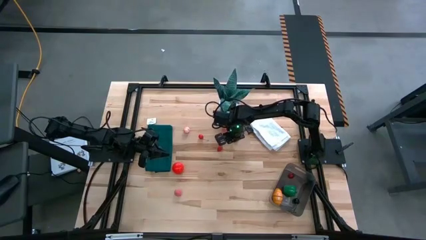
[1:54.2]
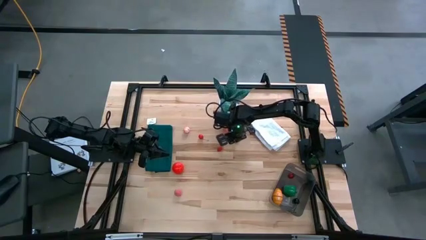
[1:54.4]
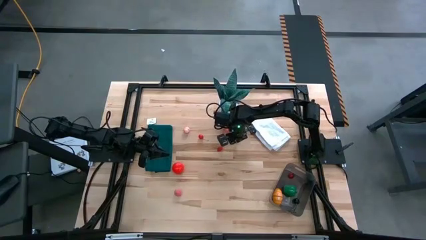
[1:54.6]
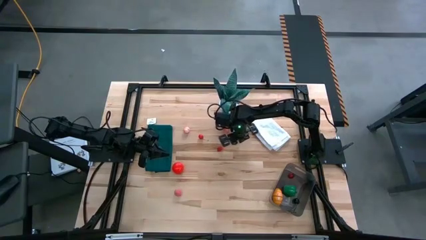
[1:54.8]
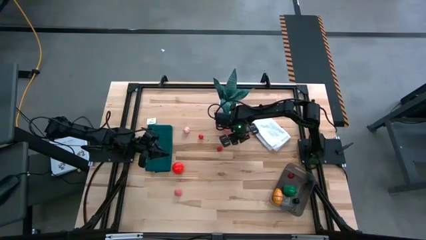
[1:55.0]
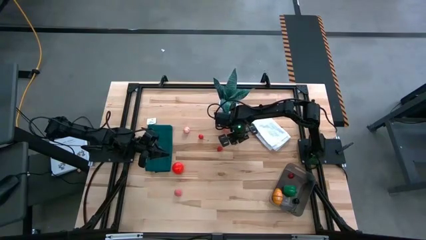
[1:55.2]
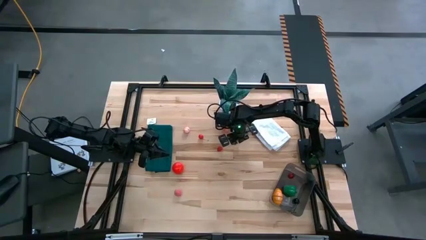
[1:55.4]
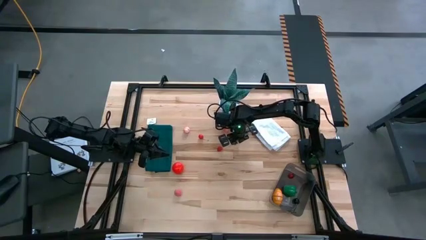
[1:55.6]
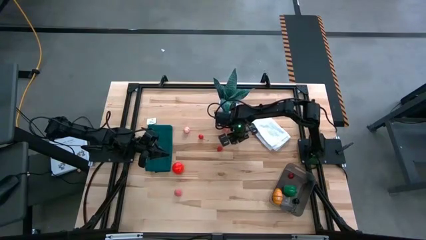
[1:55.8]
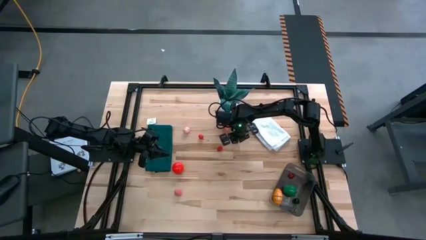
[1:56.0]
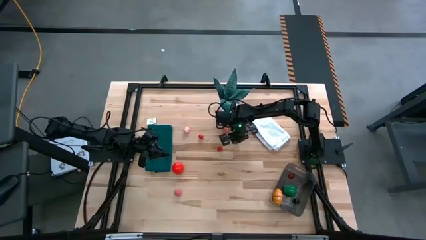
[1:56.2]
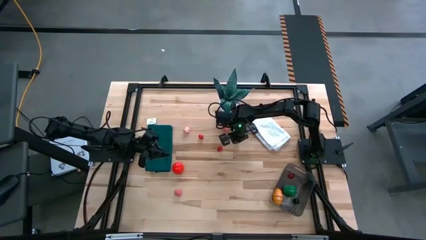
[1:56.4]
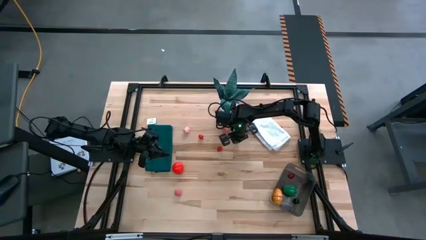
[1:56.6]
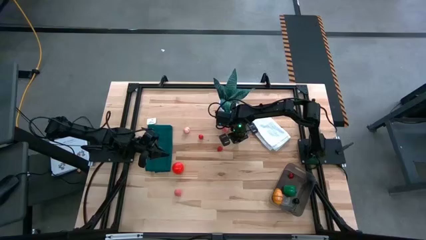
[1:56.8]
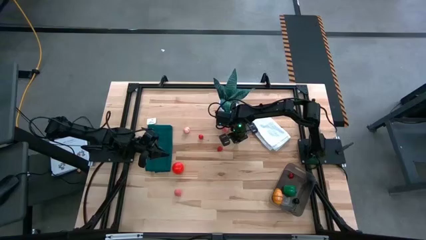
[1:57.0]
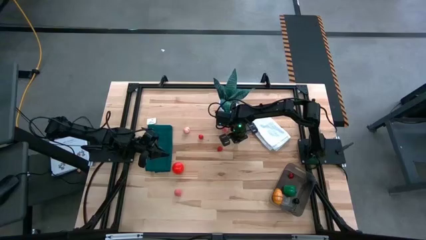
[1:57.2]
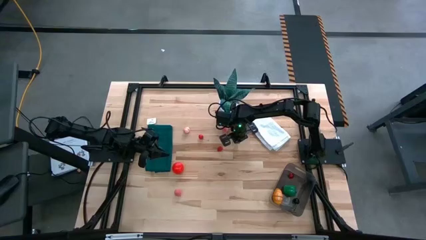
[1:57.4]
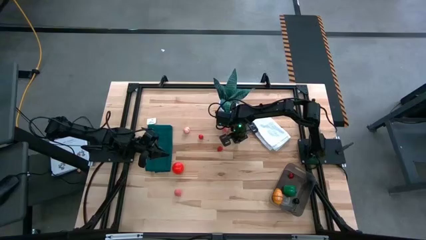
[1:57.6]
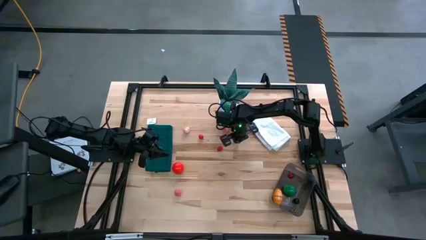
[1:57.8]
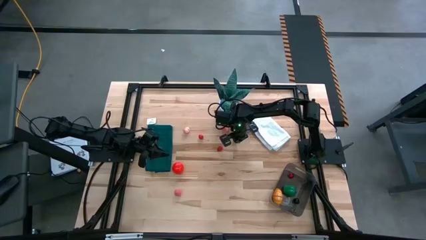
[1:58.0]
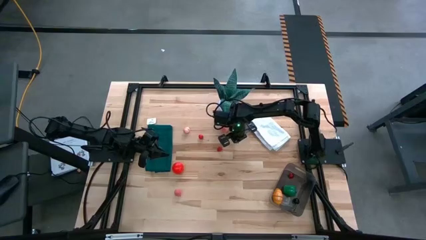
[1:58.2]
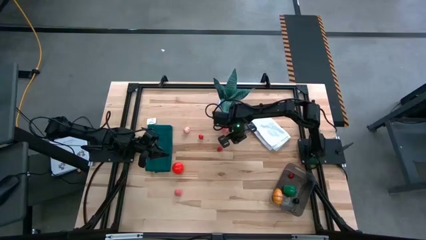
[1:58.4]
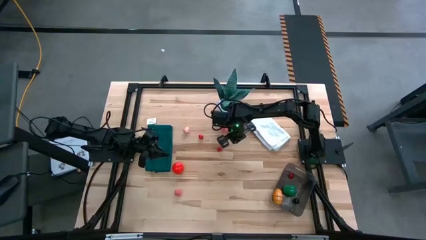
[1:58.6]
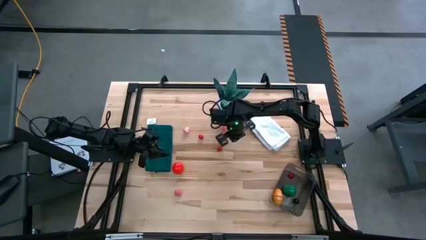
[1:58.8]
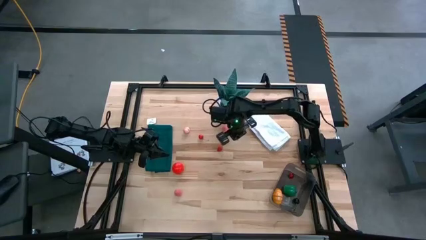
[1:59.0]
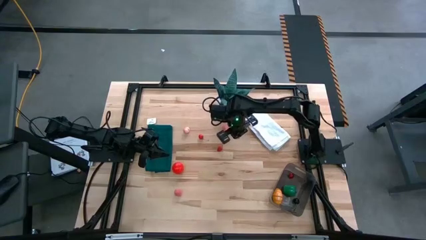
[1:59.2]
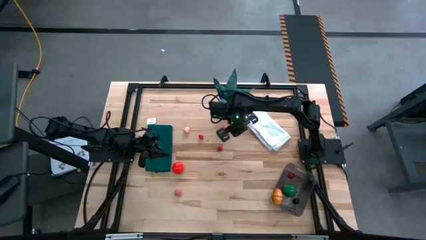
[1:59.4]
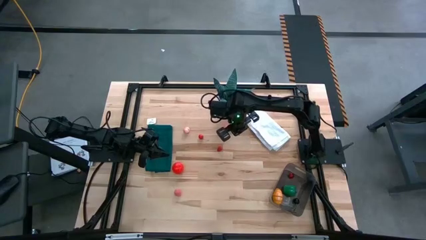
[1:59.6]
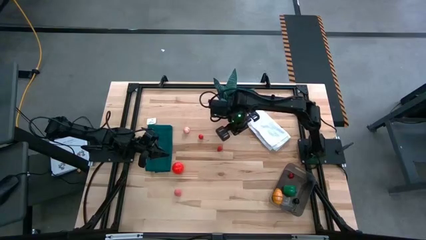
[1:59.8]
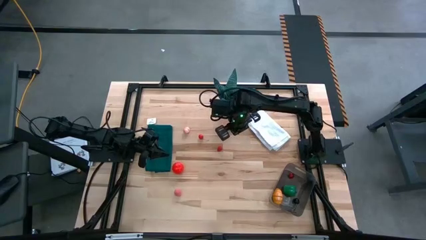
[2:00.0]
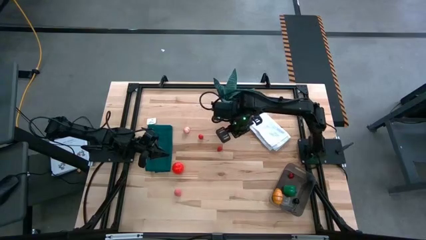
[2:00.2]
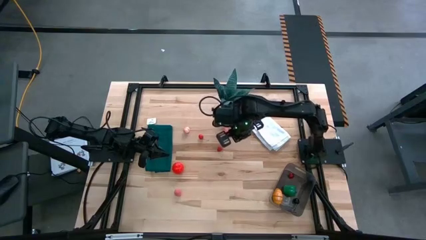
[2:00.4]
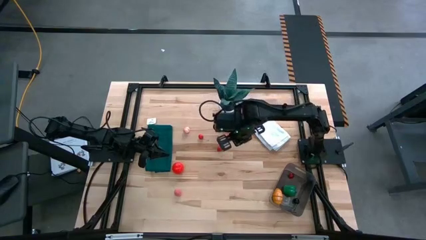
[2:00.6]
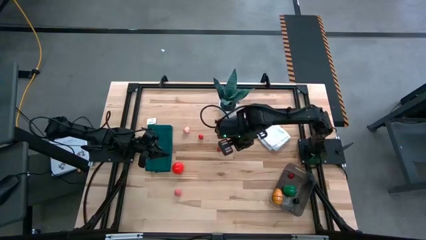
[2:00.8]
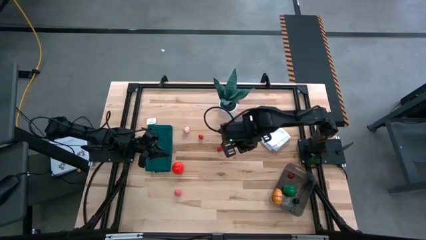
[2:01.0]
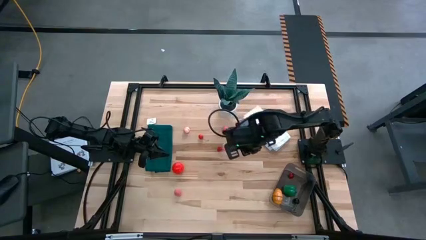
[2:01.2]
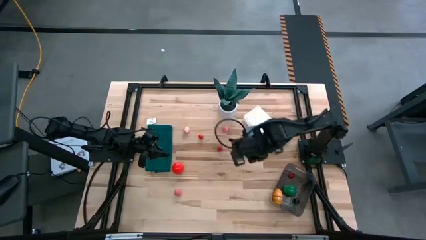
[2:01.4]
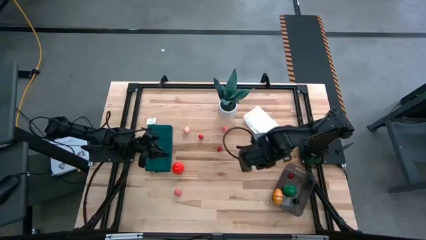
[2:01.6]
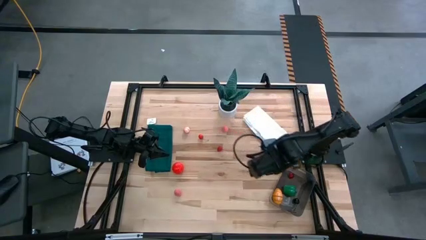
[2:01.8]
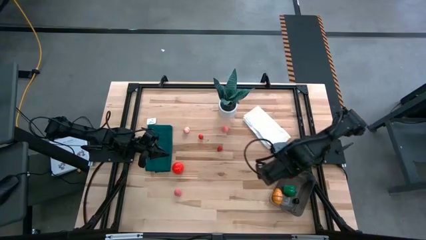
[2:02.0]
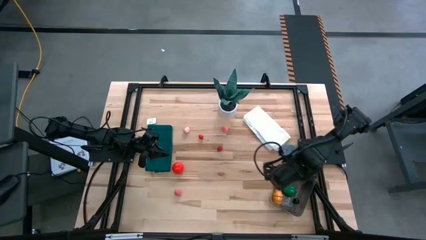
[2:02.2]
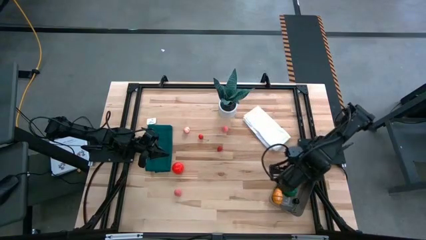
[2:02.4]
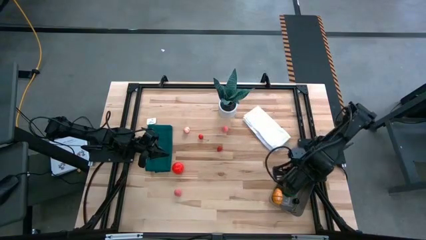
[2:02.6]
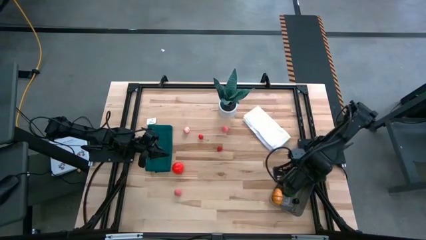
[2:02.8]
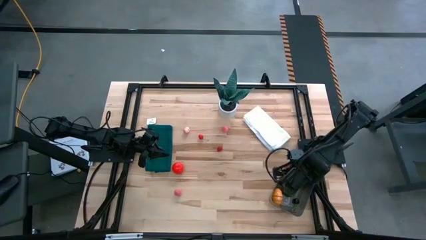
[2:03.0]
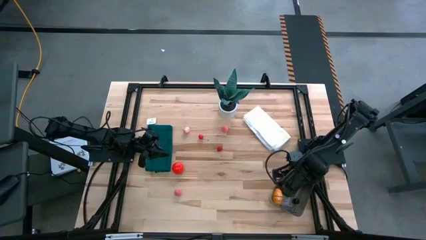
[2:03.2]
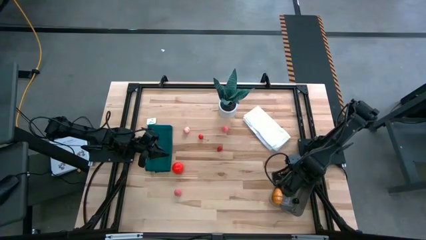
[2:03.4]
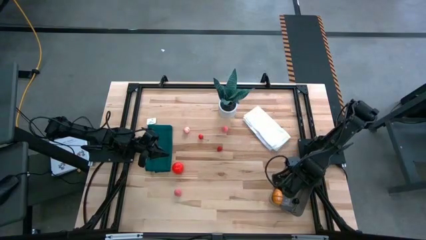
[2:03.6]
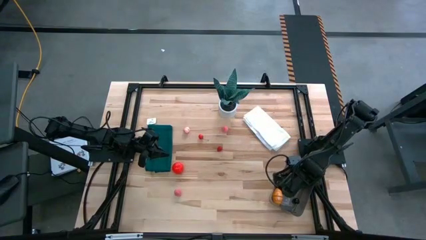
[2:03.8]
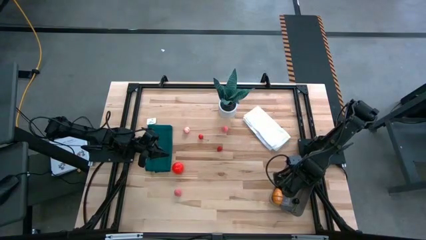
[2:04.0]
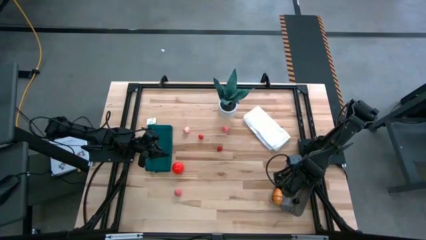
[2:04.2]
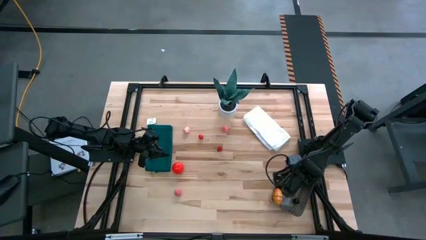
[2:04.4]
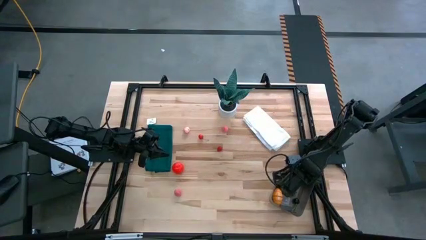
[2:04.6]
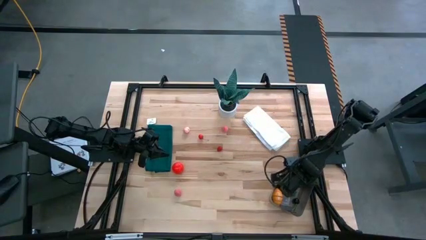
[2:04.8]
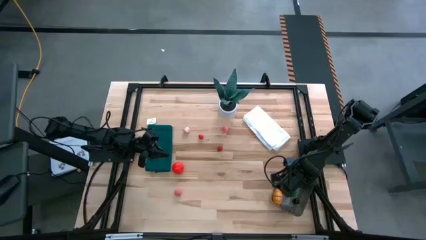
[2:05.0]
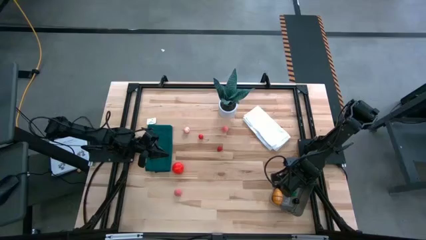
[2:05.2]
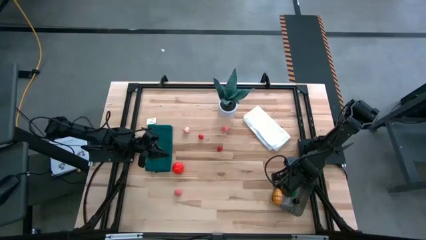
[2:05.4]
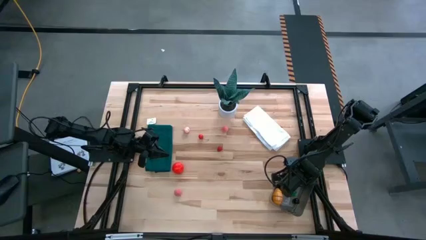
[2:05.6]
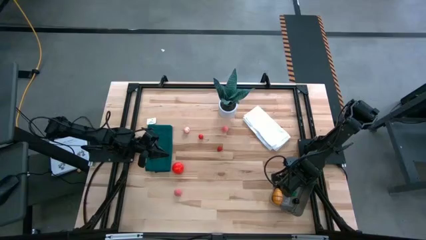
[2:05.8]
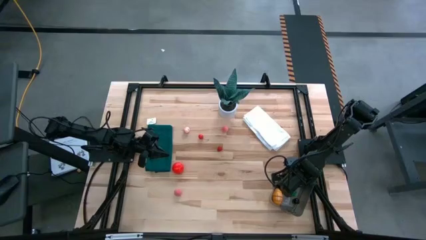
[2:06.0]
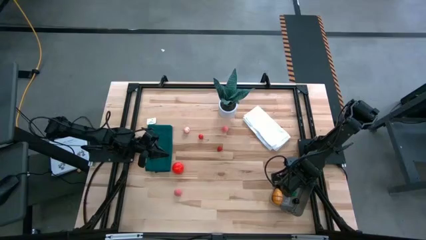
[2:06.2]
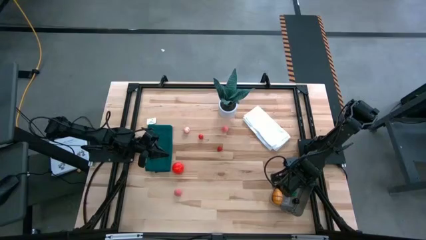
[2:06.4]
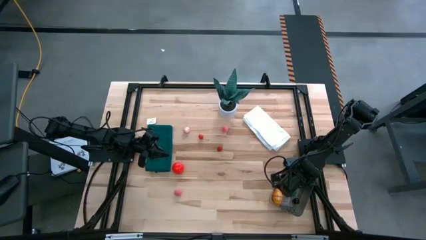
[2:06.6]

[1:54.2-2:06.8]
Task: Pick and placing Produce into tupperware
Put the right red cherry into the black bin

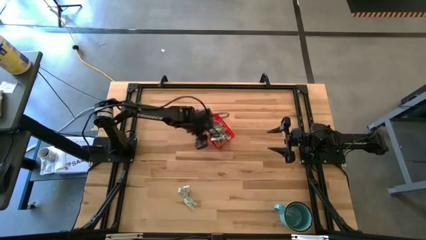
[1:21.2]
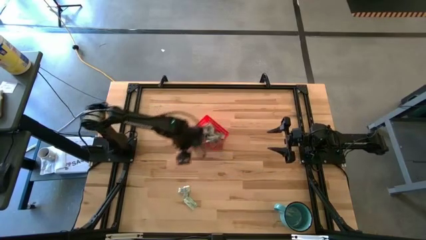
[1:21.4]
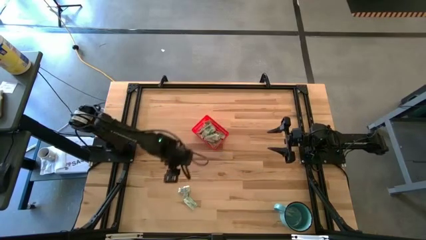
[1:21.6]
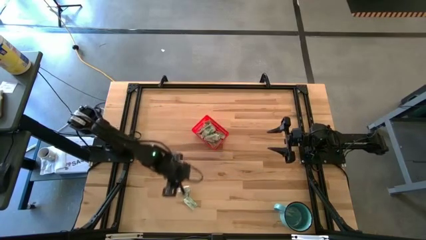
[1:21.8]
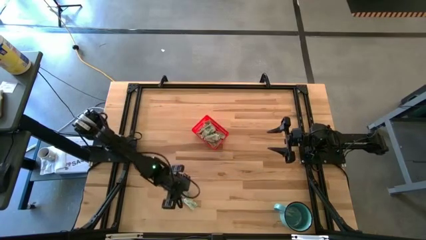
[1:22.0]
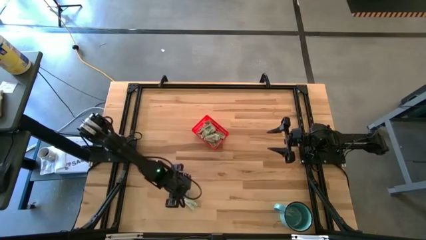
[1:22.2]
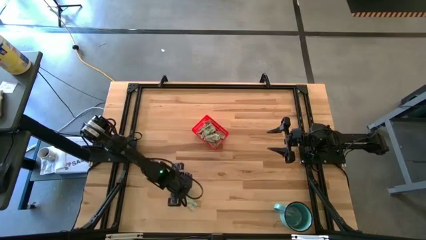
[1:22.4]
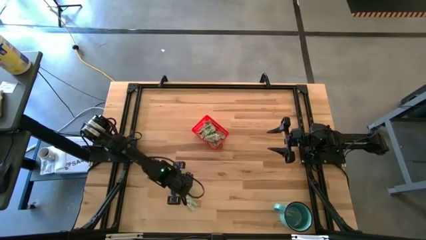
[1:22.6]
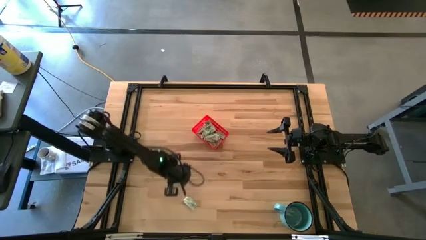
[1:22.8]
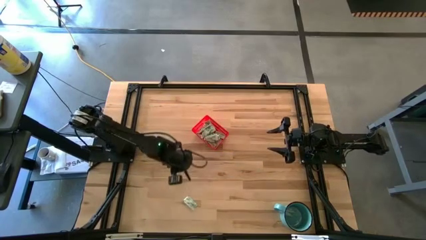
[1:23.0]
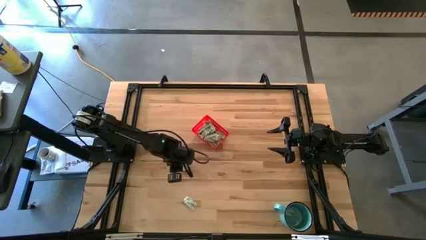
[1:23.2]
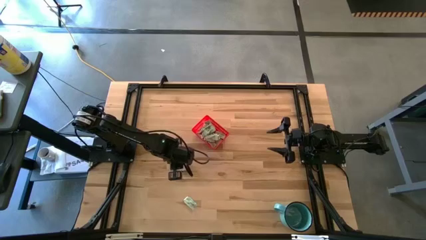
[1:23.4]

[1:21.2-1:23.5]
Task: Pick and place Stevia / Truvia into bins
Put the stevia packet into the red basket

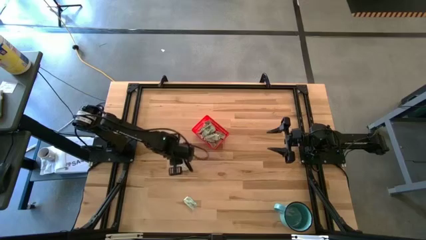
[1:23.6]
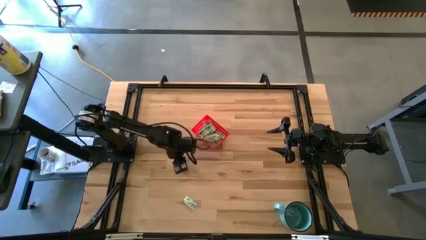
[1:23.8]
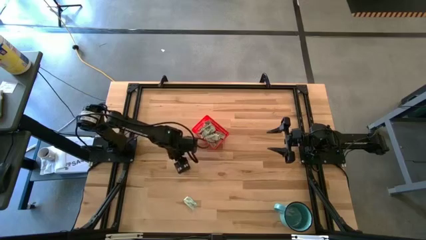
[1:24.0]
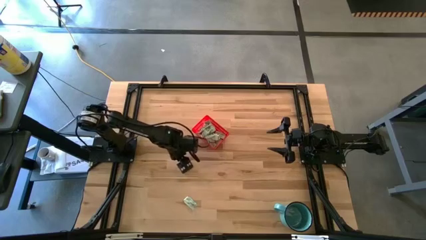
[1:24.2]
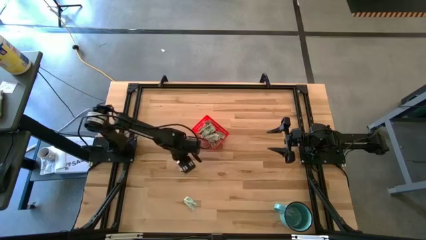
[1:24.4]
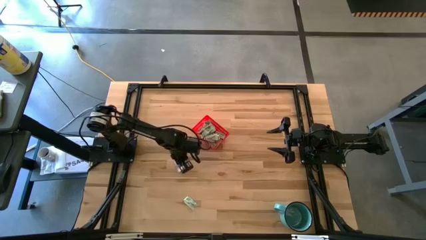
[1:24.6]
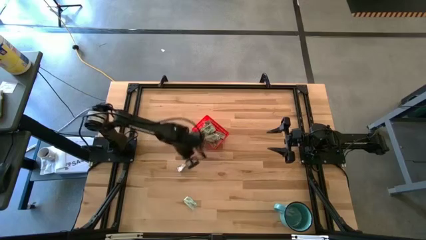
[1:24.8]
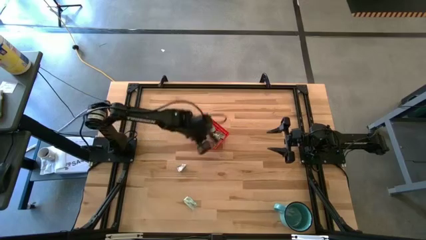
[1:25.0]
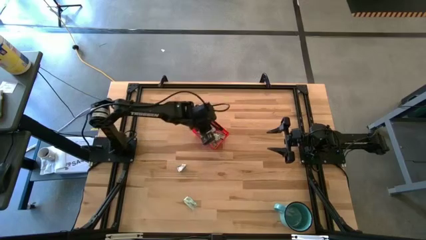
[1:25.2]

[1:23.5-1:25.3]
Put the stevia packet into the red basket

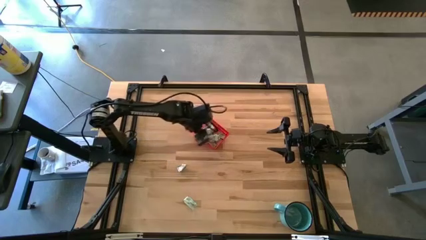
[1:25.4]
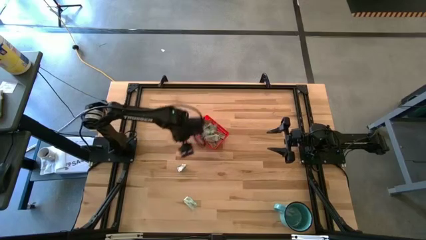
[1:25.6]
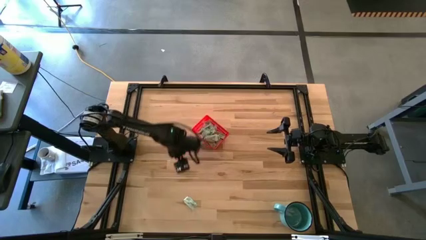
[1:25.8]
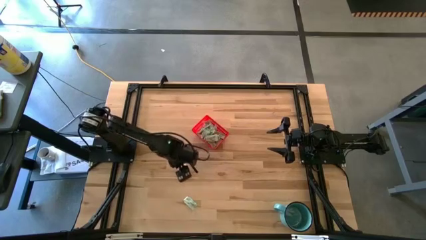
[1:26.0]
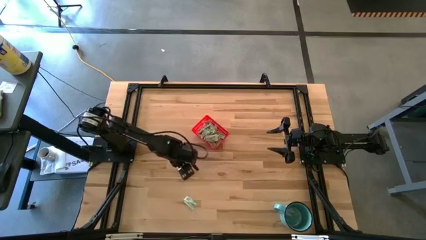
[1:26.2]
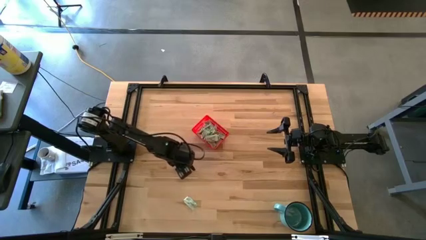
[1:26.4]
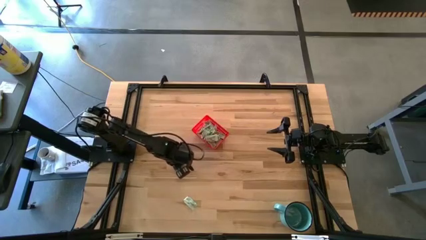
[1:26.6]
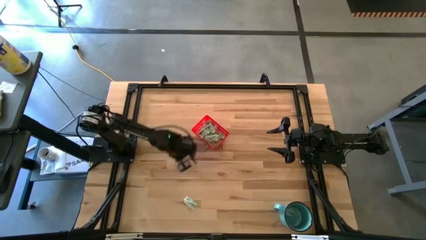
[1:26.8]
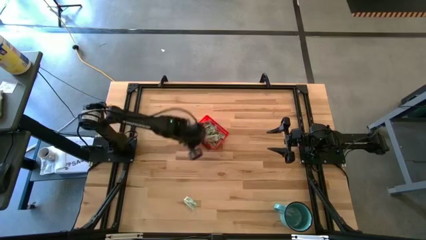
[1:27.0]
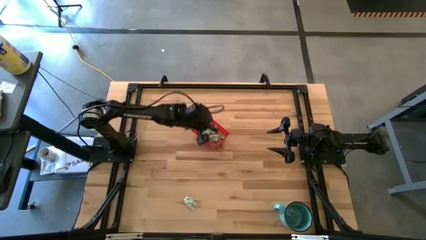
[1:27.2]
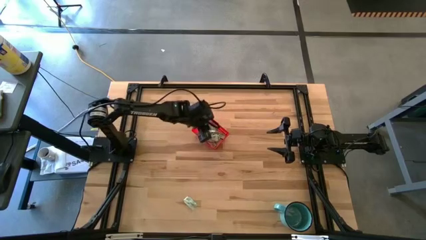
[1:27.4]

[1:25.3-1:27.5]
Put the truvia packet into the red basket
